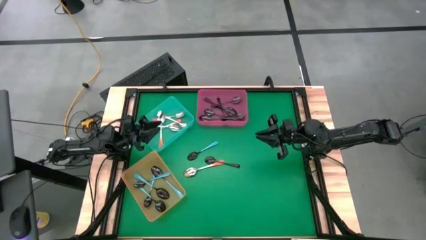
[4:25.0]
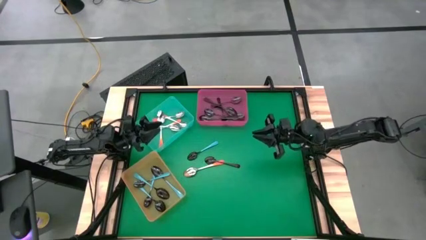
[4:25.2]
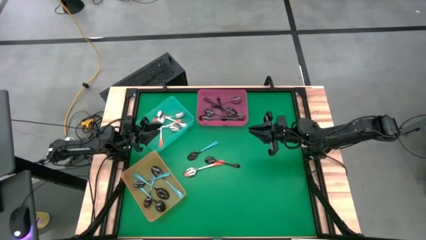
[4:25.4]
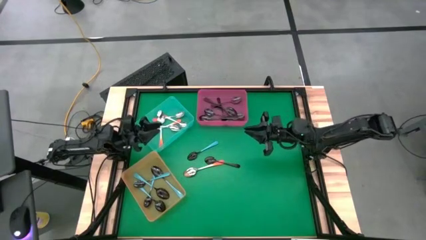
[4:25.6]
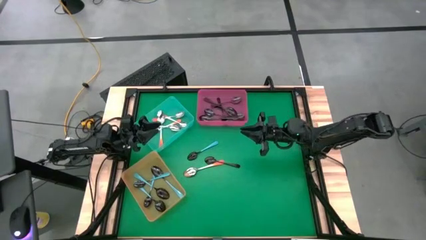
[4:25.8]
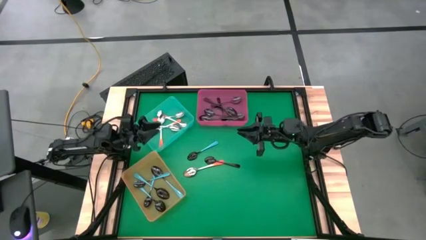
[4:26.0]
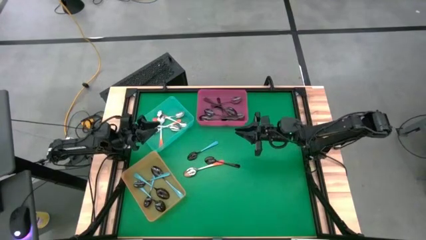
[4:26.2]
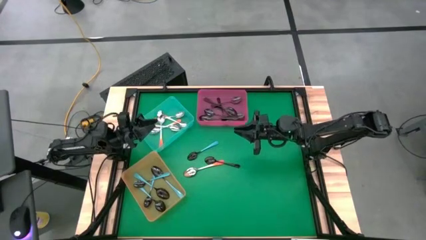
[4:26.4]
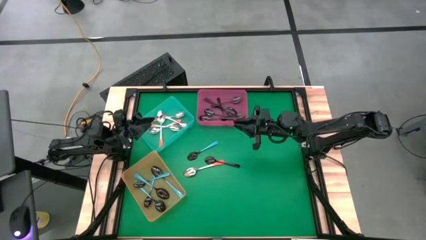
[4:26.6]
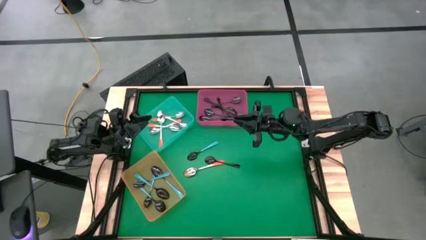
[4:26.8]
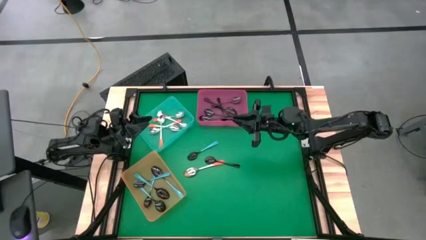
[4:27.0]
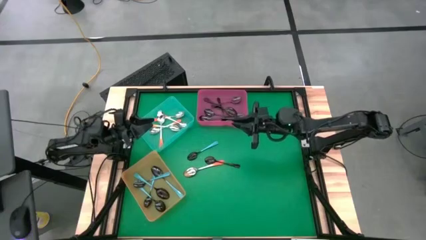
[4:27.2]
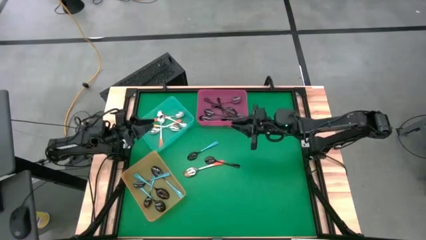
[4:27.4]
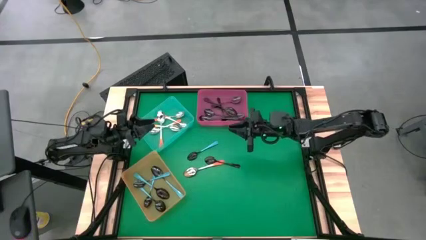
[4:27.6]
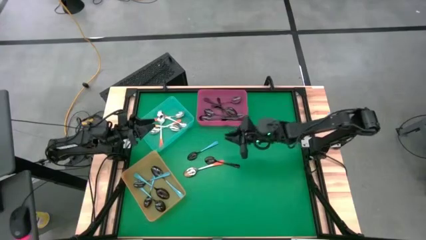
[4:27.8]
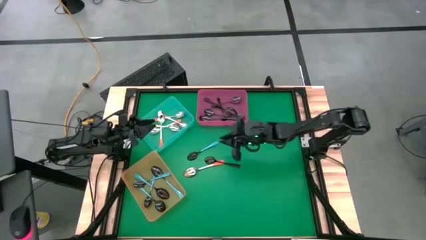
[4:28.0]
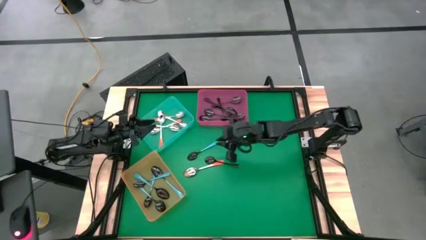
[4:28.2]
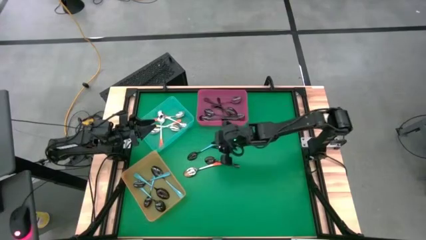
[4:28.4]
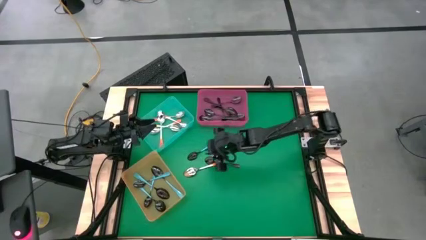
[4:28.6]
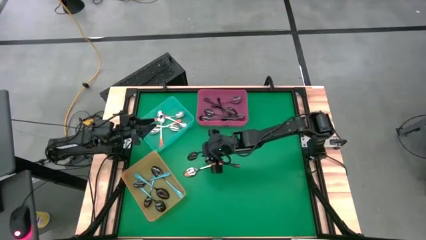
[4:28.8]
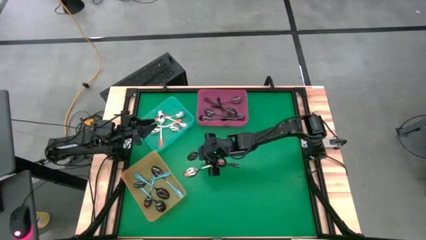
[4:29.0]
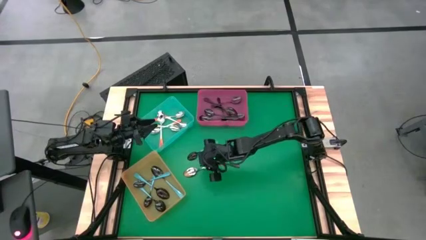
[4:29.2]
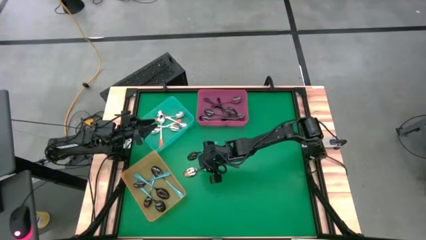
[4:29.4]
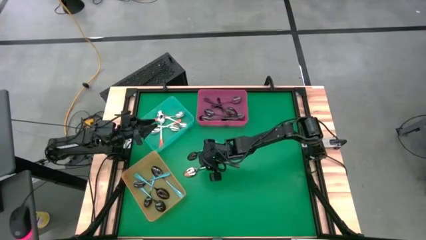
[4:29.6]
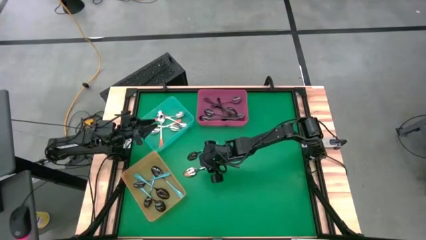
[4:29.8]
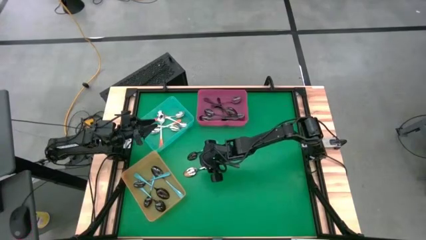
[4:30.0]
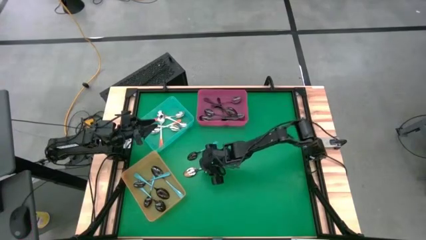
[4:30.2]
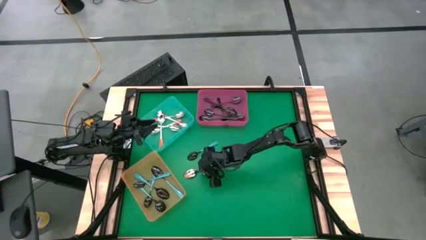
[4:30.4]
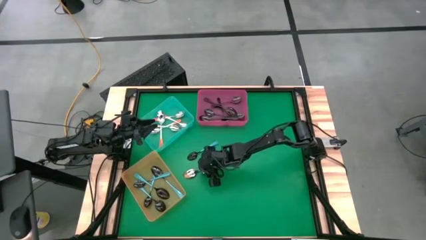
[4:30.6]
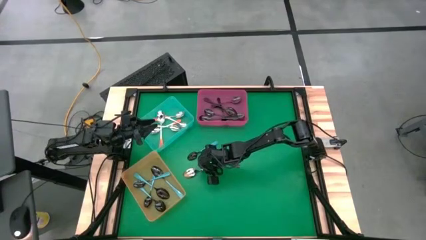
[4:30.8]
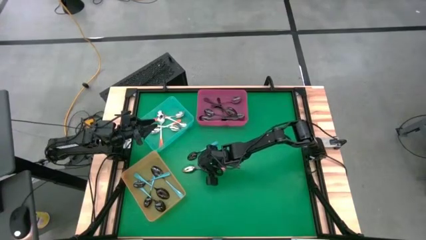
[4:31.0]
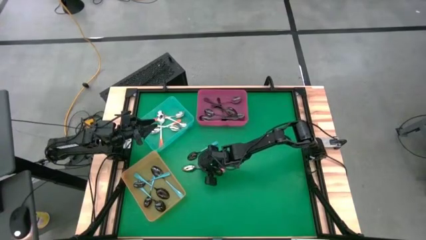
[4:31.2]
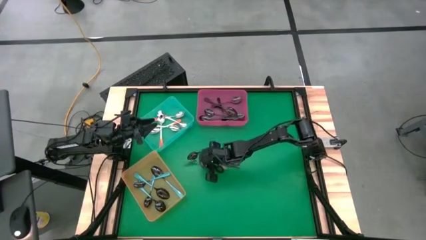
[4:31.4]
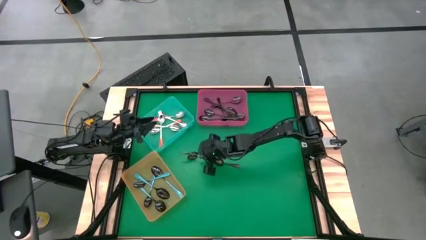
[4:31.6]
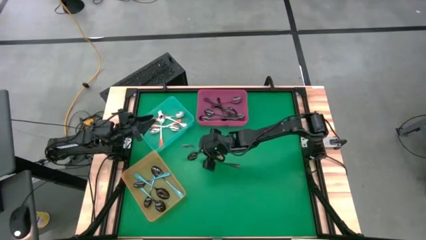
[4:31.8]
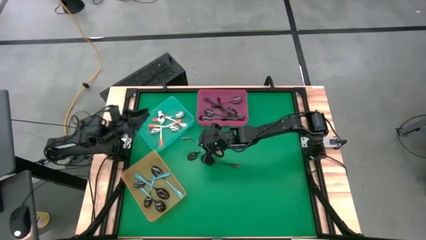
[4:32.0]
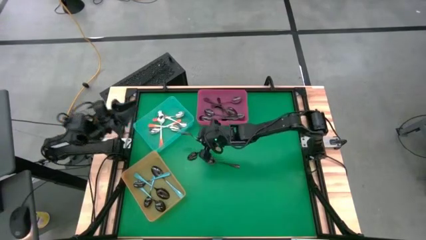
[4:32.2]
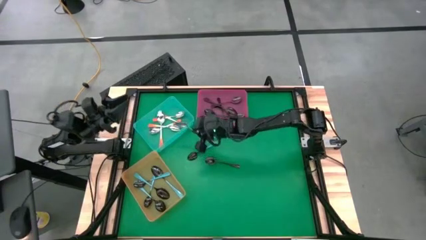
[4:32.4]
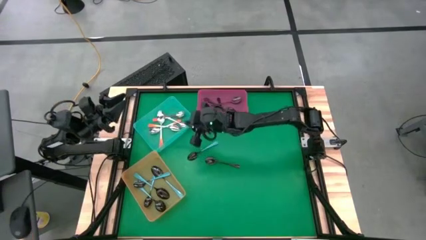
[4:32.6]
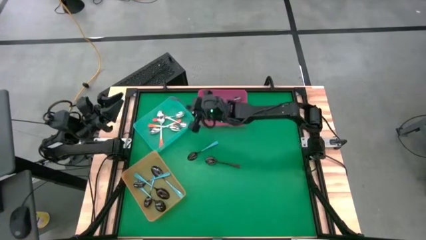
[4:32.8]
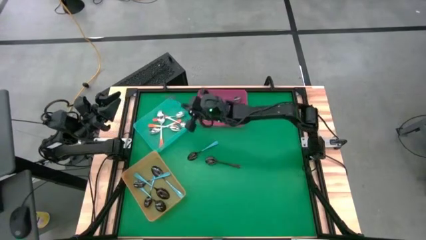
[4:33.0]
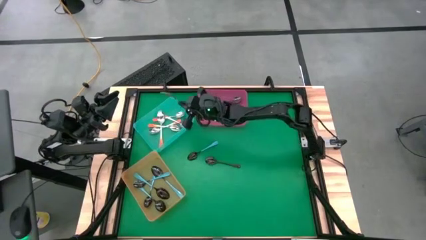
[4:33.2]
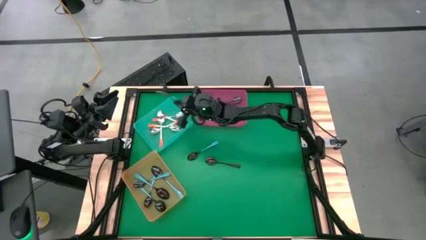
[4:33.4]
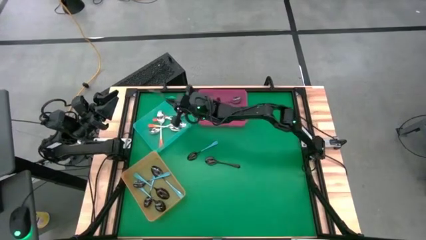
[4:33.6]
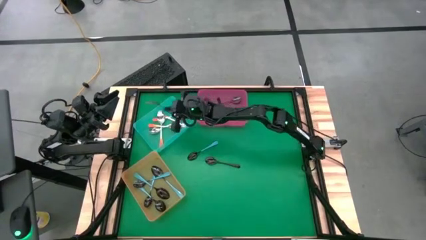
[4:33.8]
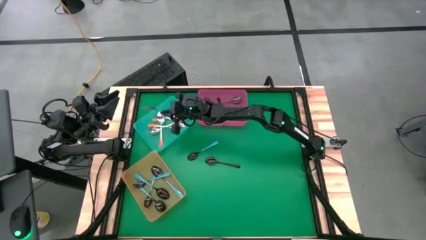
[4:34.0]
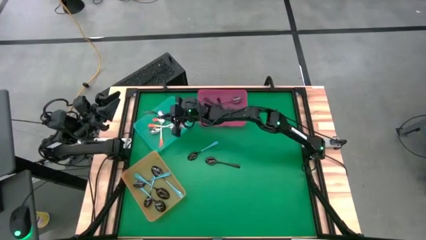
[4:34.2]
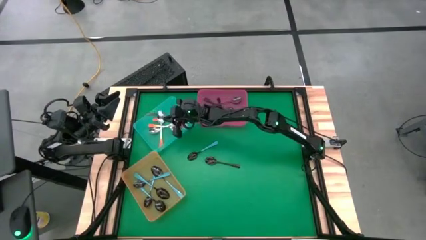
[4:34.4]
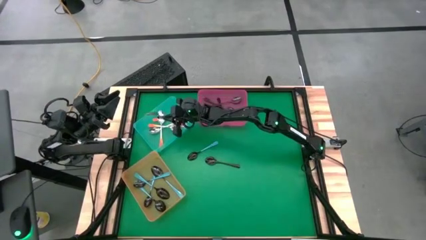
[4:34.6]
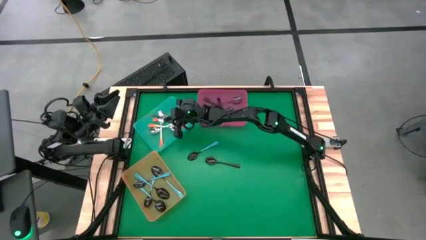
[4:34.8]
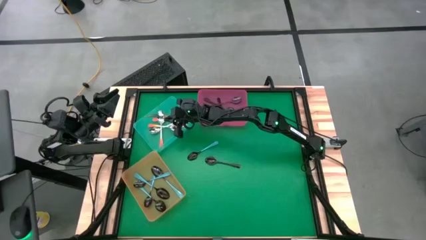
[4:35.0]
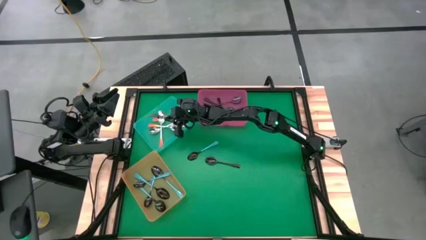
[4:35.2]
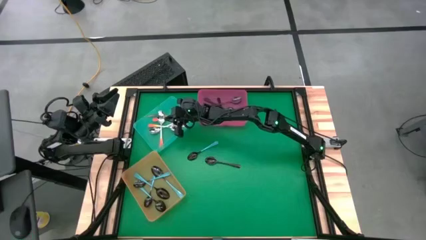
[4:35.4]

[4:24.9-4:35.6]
Task: Sort silverware by color (type)
Put the orange spoon into the blue bin

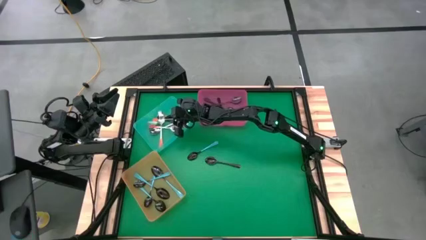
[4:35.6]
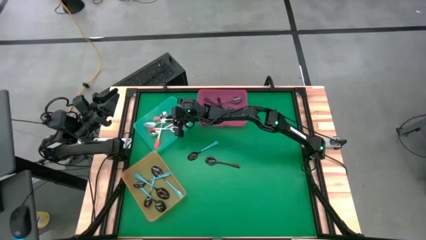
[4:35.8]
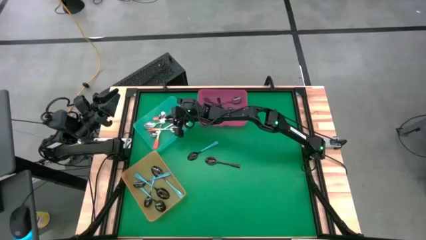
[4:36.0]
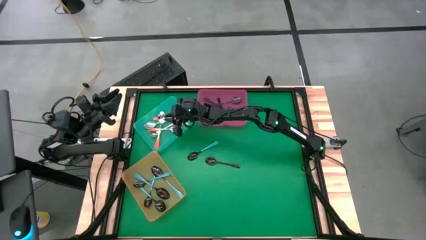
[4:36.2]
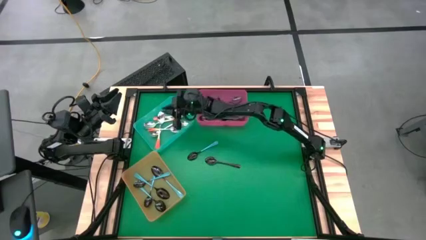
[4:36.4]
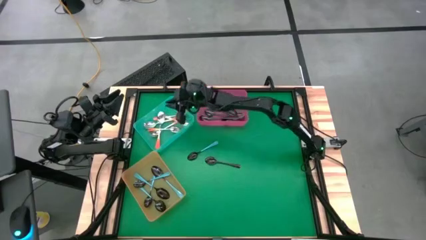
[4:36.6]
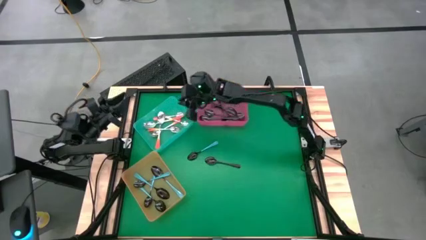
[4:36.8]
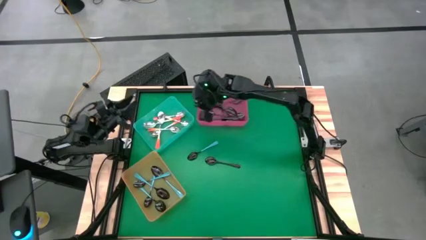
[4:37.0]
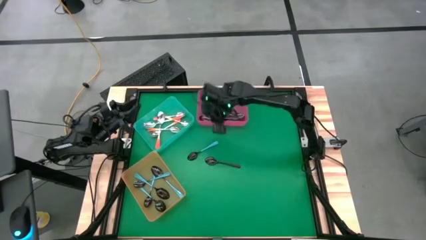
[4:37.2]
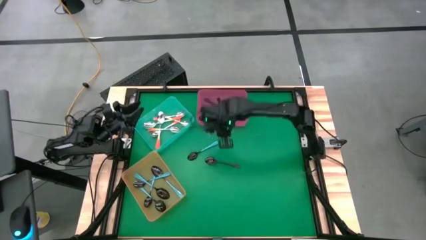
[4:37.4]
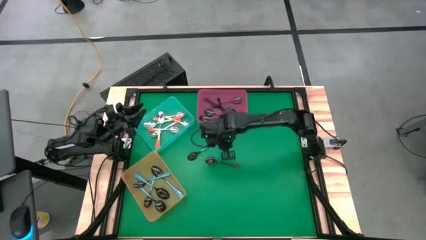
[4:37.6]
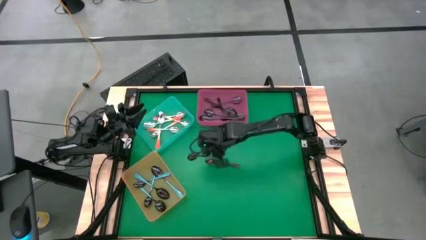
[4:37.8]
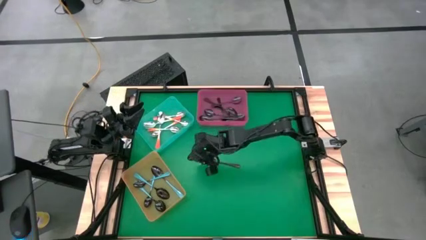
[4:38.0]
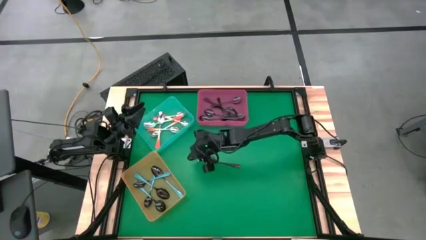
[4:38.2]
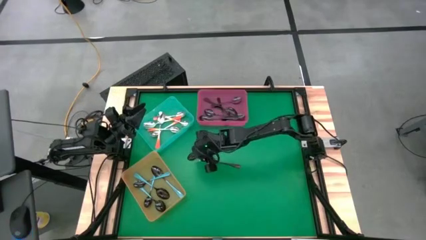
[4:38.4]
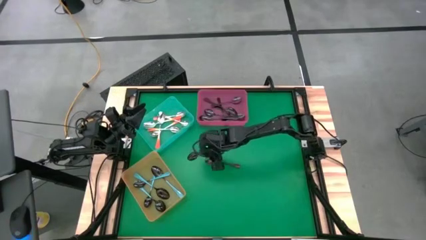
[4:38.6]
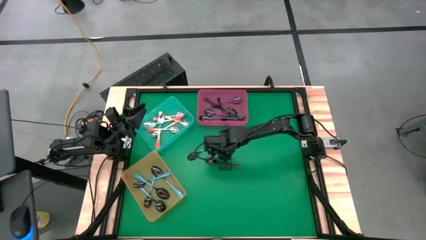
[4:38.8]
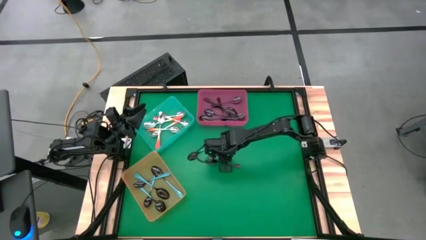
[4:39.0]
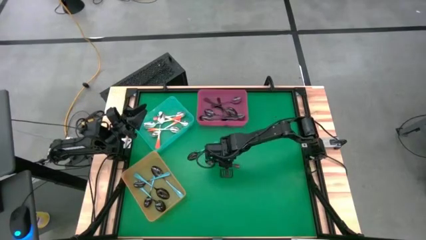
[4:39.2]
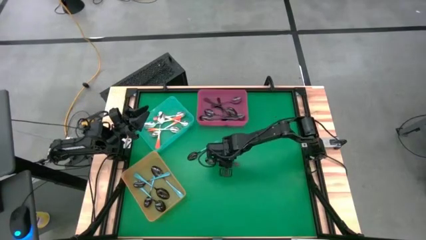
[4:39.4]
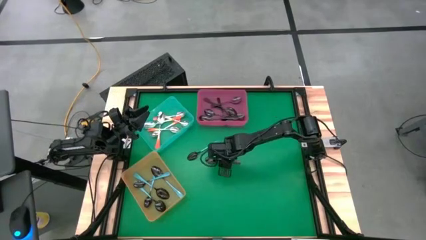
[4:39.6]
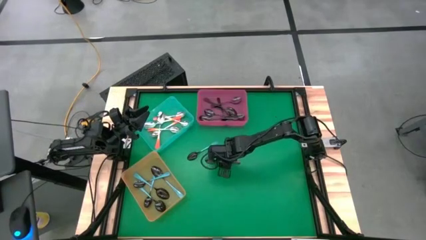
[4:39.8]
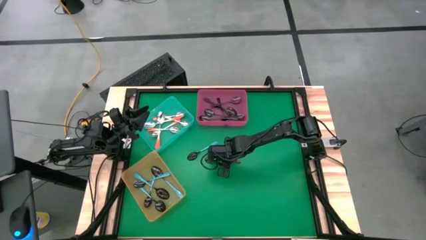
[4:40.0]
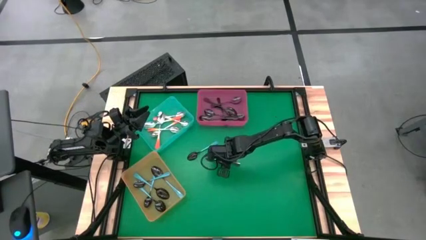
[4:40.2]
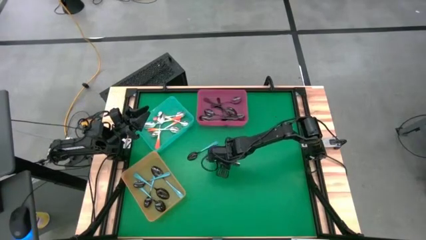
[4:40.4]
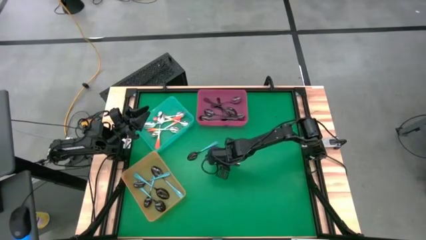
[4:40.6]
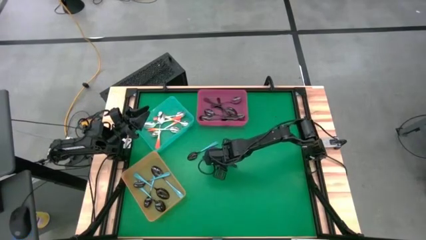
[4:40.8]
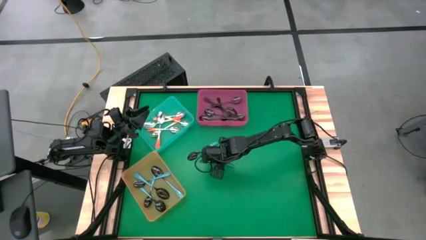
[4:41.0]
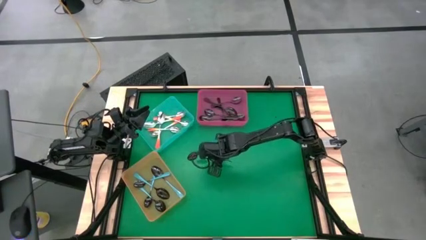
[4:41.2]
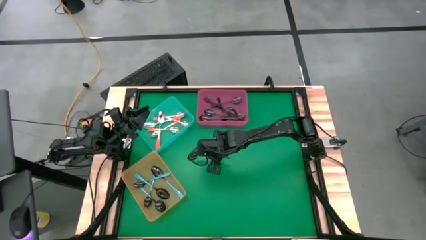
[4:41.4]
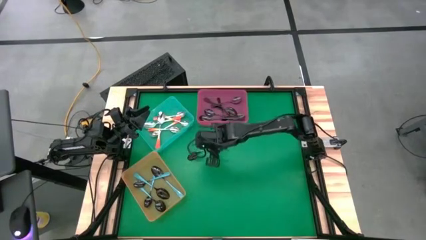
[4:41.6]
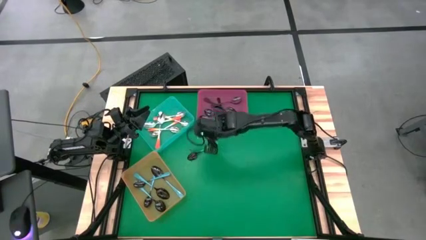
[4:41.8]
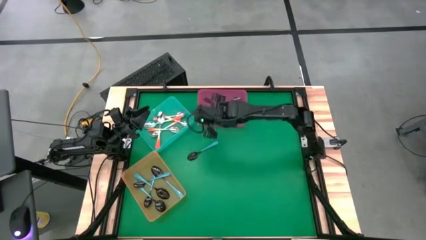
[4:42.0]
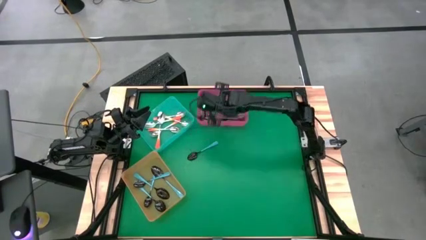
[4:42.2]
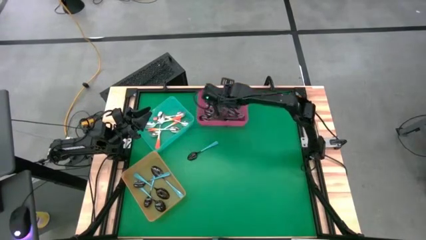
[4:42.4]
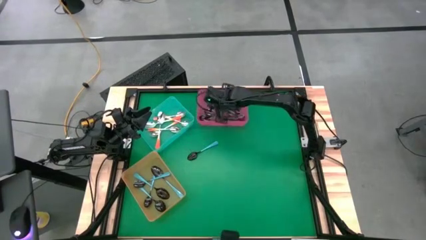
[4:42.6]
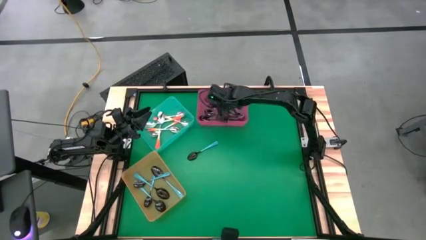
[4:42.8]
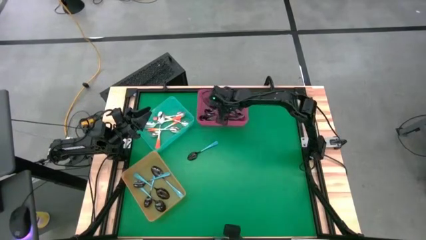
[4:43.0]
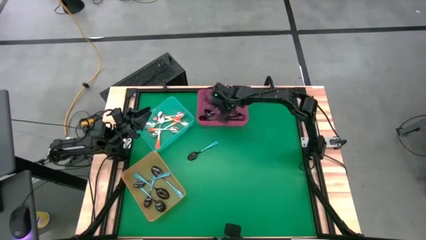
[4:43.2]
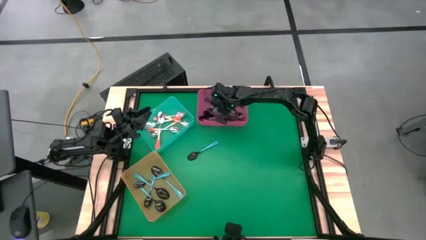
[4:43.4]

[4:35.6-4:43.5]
Put the black spoon into the pink bin
